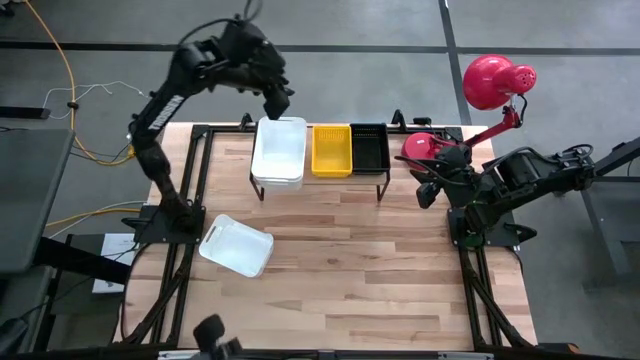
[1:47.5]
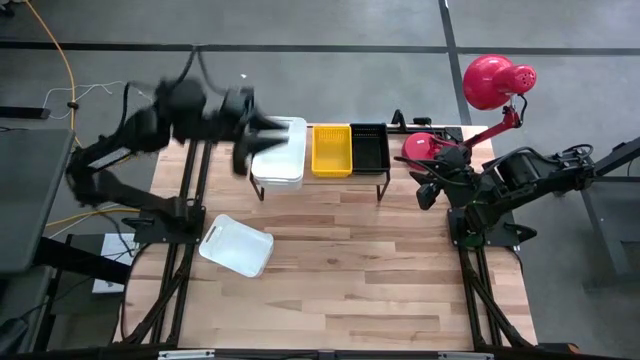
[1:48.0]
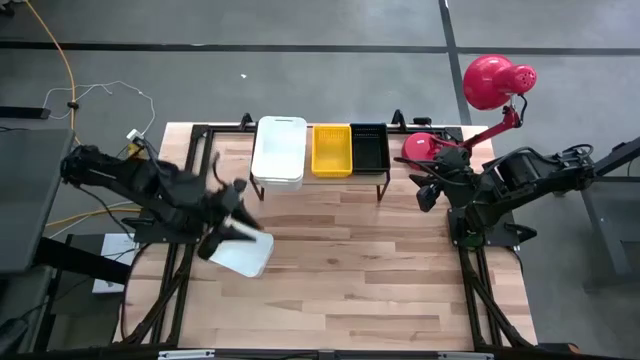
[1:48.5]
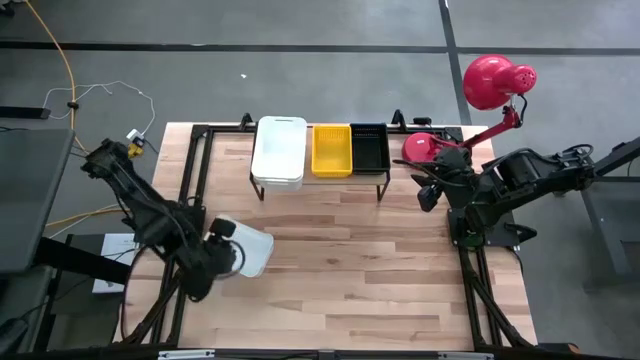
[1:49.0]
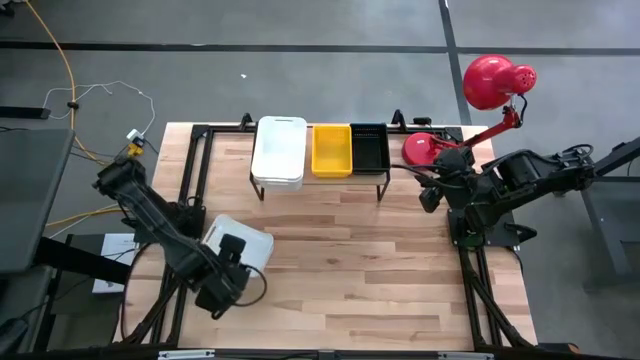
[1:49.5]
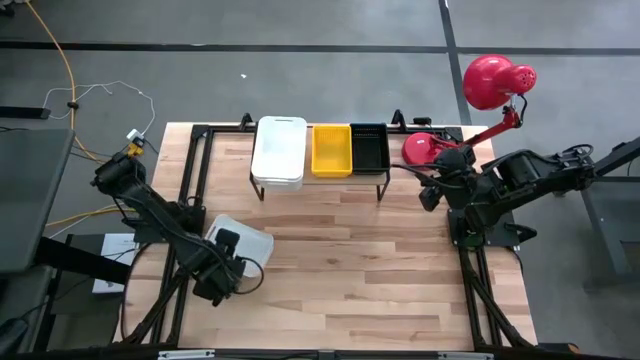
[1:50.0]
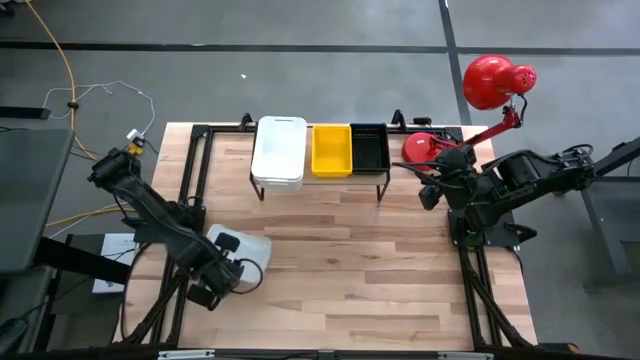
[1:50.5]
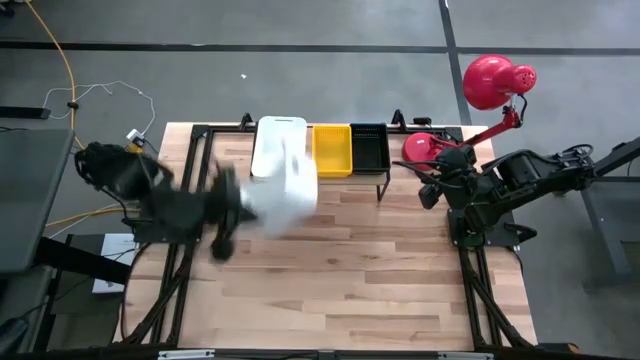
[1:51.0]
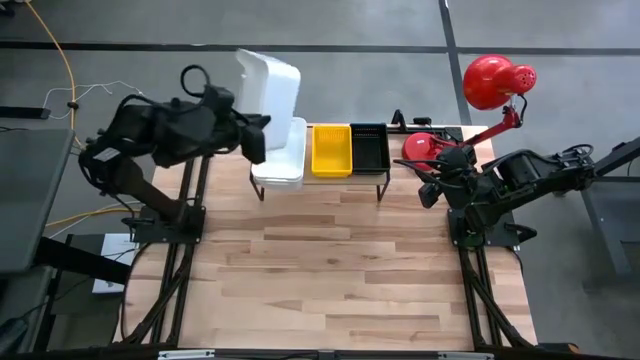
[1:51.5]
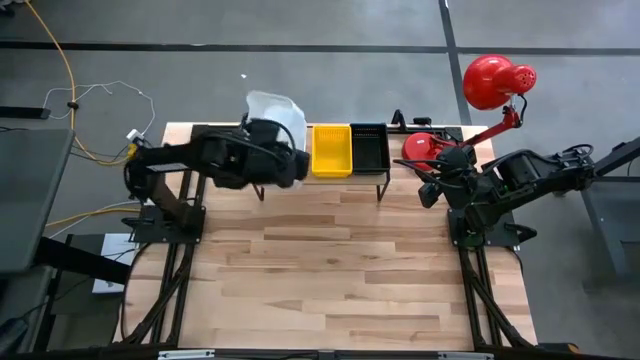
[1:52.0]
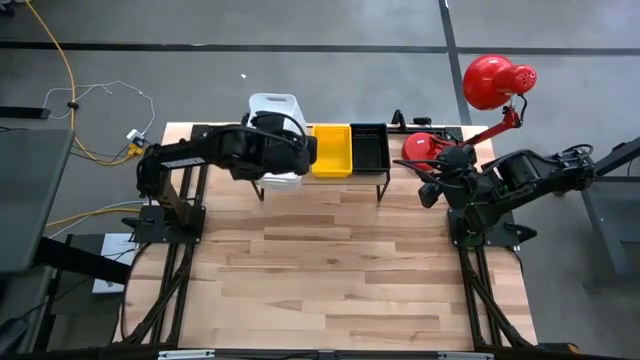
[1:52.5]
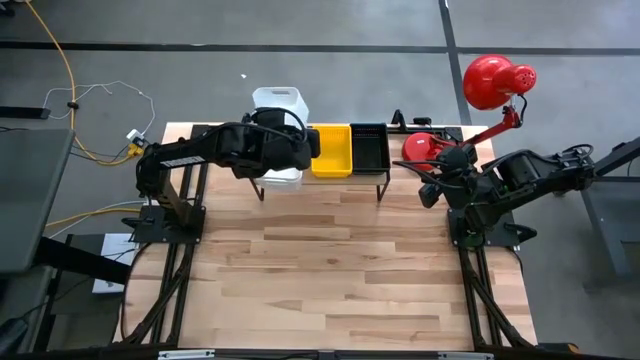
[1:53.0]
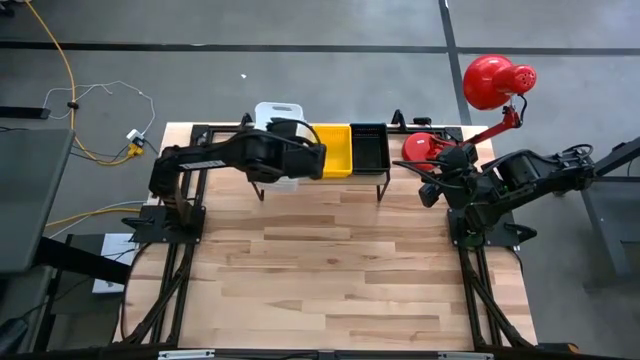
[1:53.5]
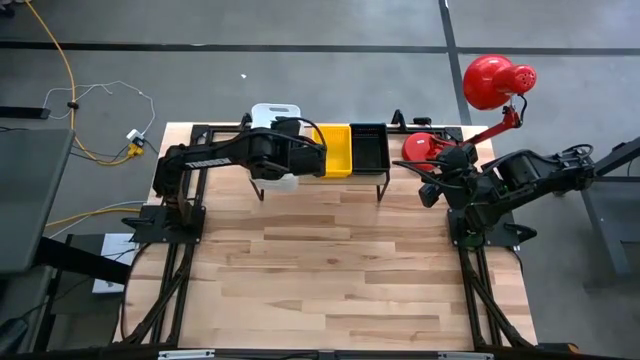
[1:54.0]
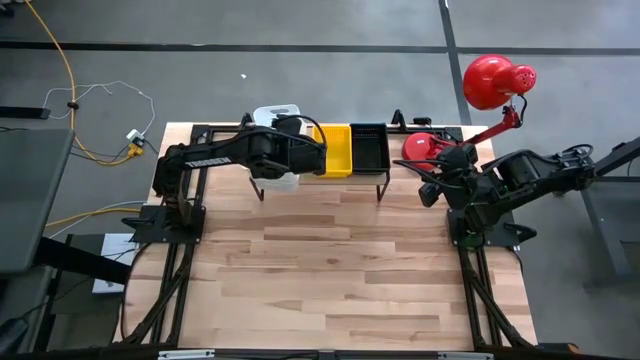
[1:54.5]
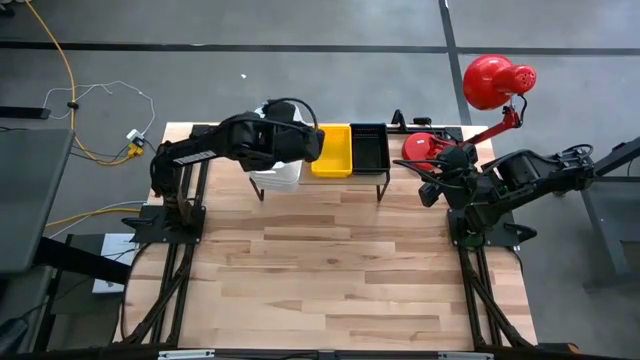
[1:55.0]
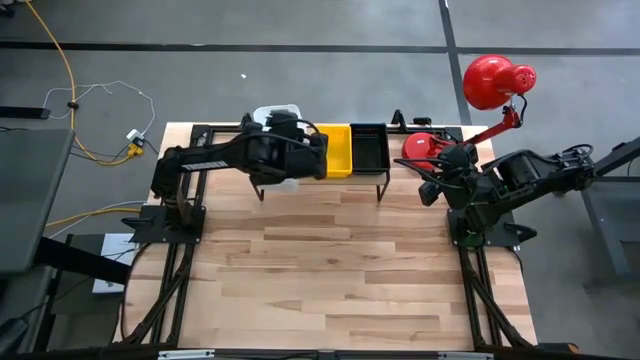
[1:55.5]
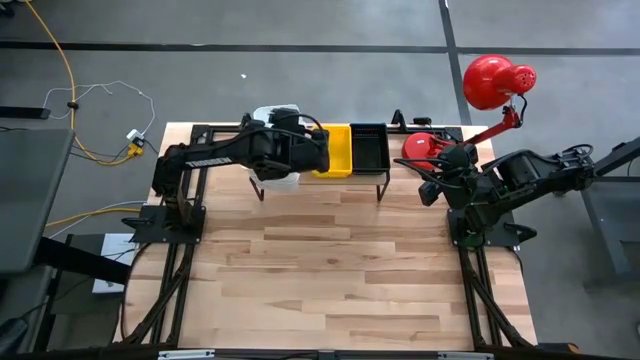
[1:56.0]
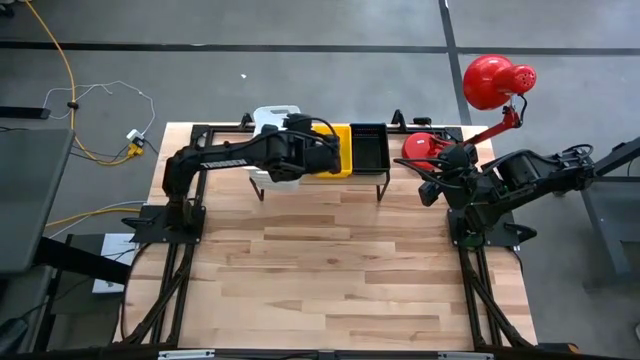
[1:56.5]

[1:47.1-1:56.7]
Task: Stack baskets on shelf by color
Stack the white bin into the white bin on the shelf

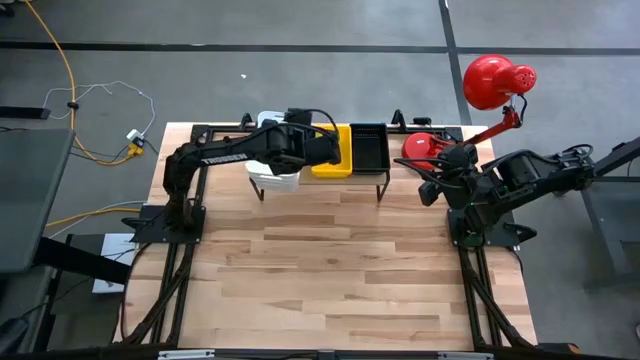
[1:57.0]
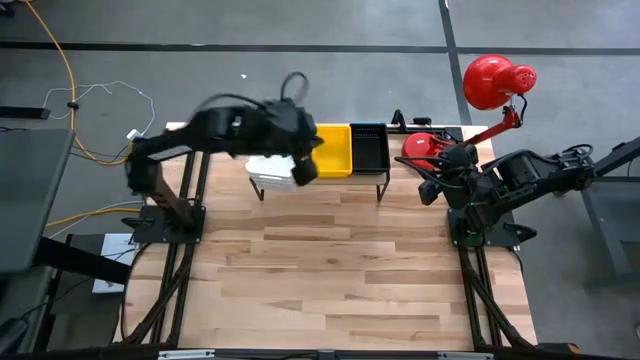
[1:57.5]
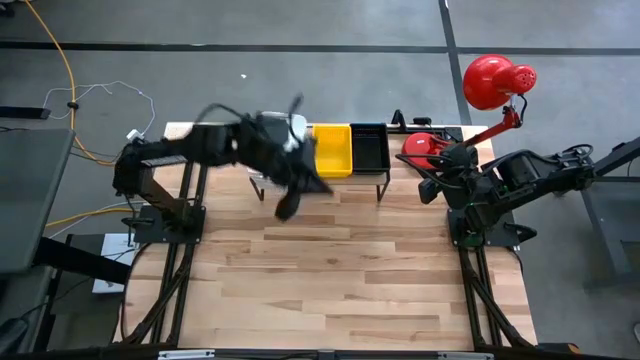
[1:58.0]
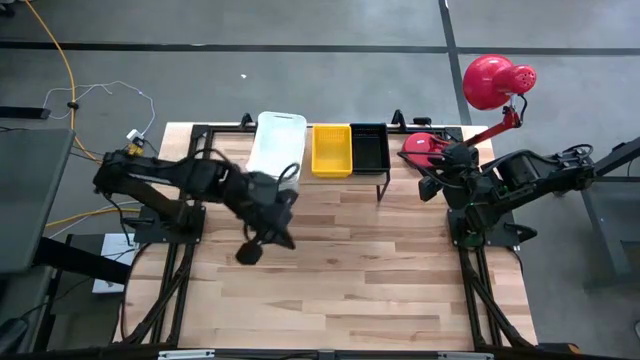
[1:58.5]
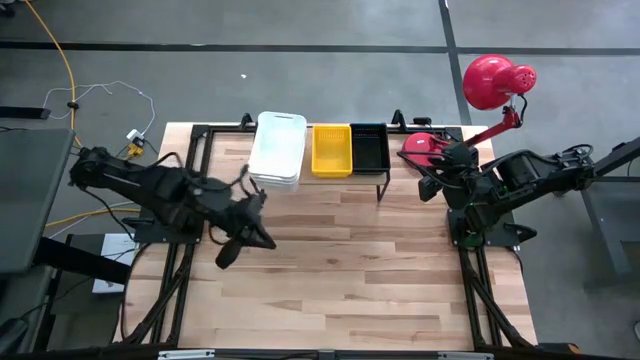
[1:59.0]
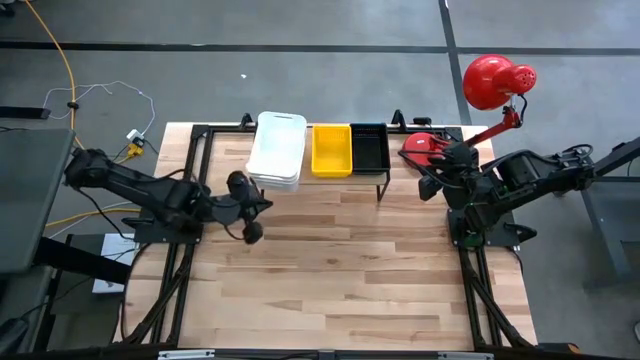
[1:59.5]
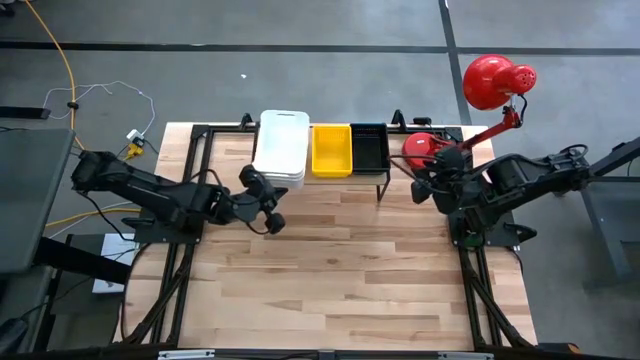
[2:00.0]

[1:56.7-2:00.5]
Adjust the stacked white bins

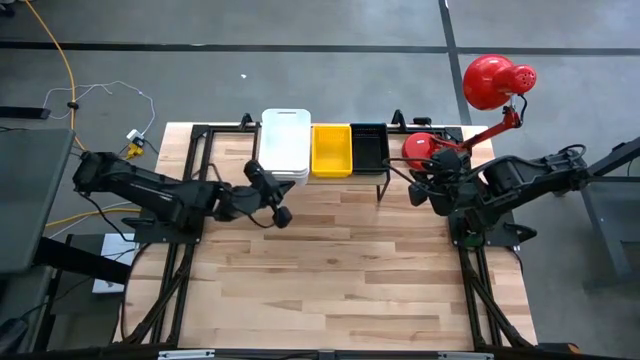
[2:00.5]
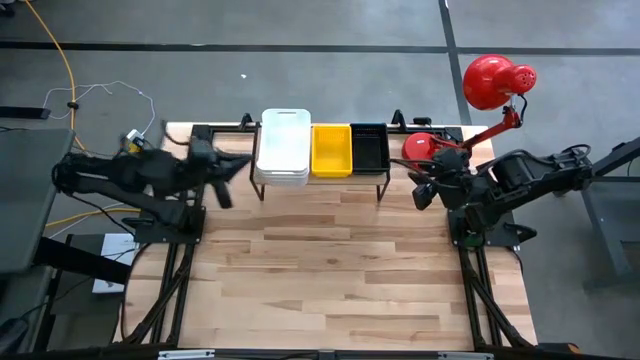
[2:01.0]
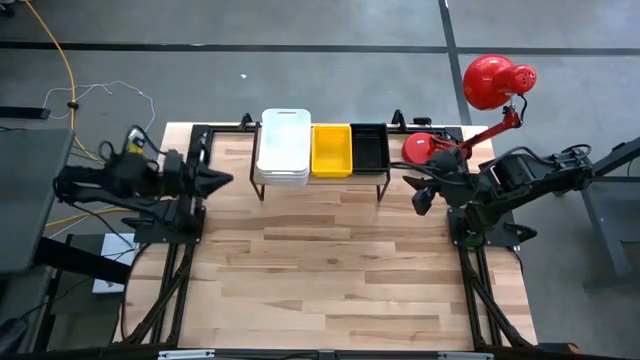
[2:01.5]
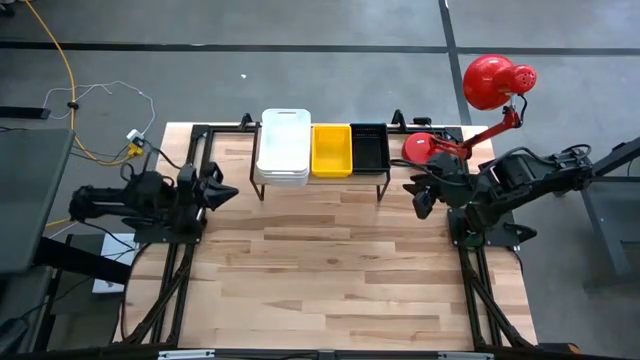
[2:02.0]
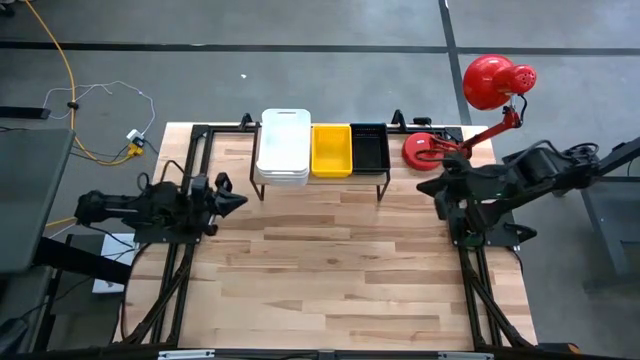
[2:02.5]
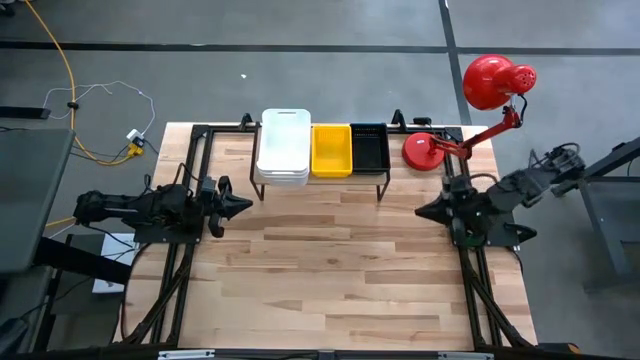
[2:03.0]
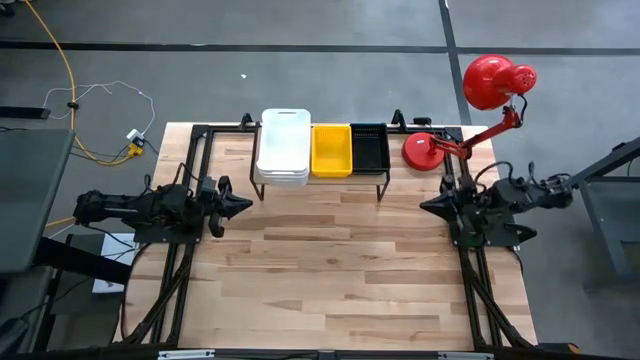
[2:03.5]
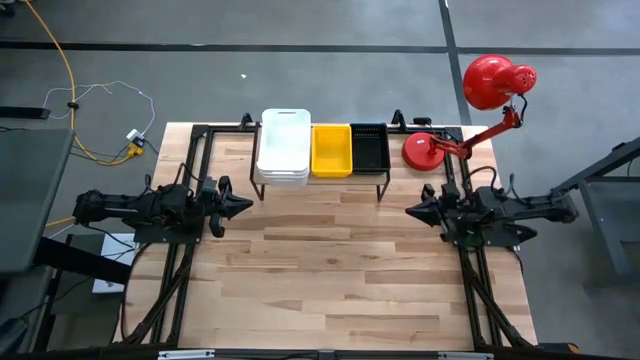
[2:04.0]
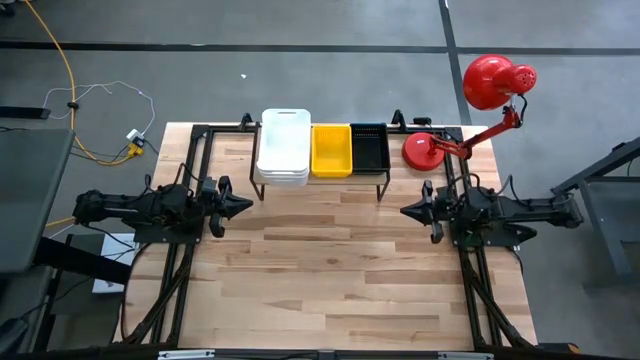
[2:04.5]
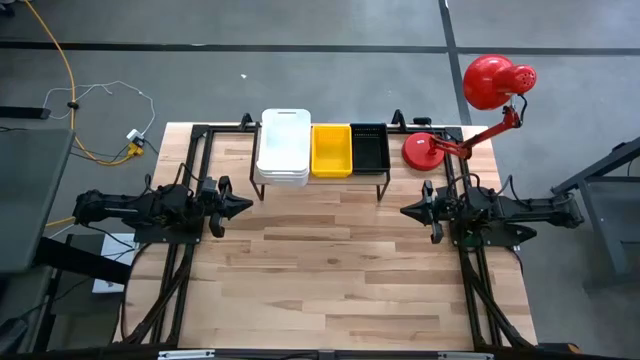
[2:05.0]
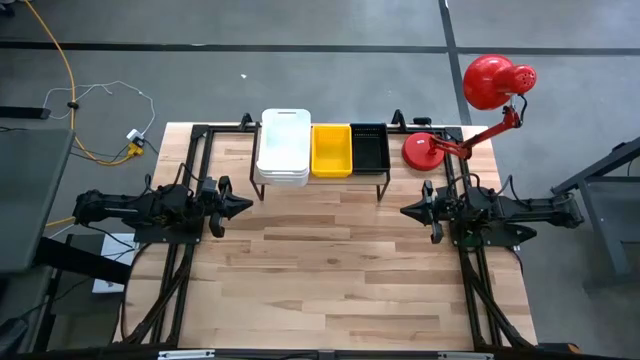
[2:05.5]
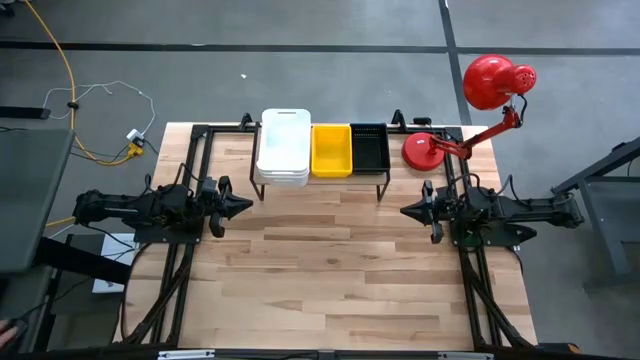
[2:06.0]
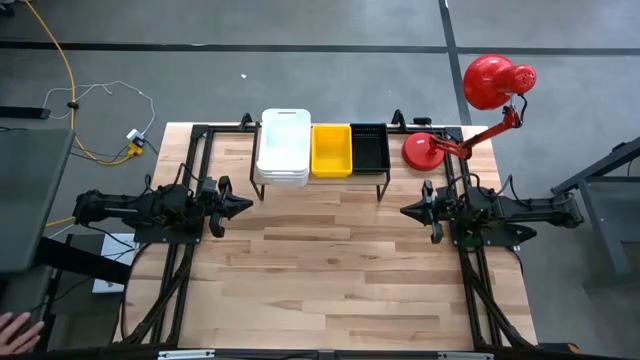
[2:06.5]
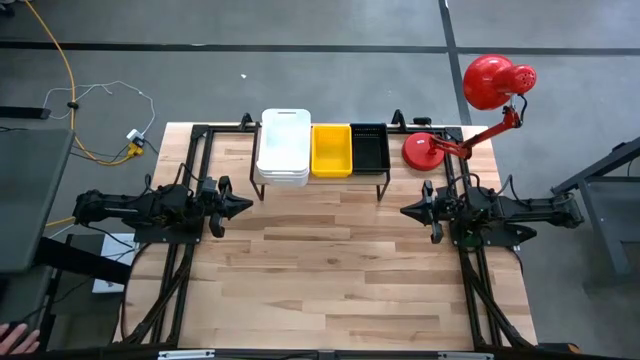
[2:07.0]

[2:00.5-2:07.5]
Return to Home Position
